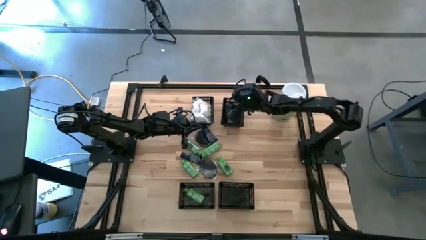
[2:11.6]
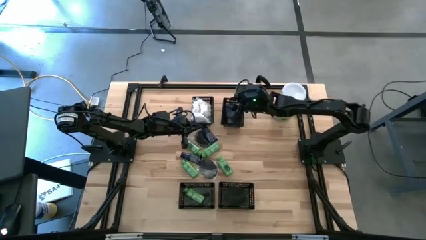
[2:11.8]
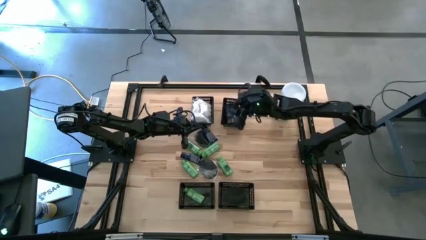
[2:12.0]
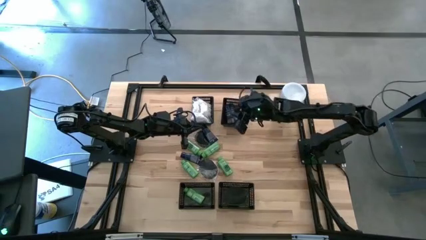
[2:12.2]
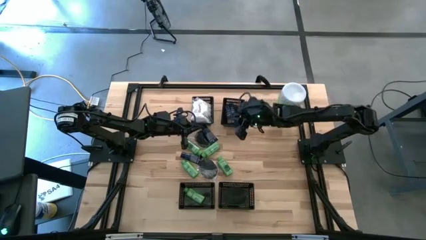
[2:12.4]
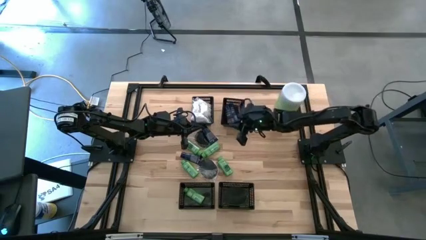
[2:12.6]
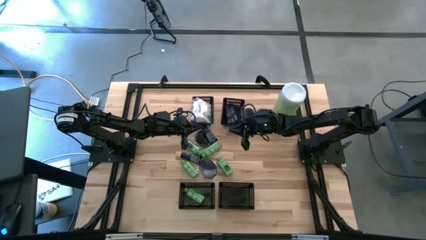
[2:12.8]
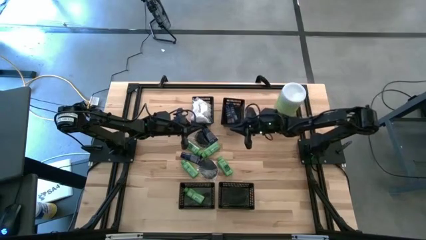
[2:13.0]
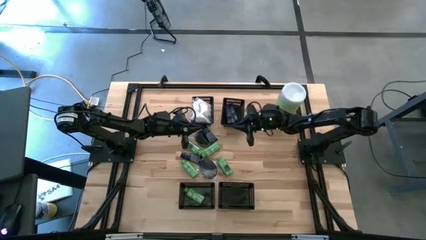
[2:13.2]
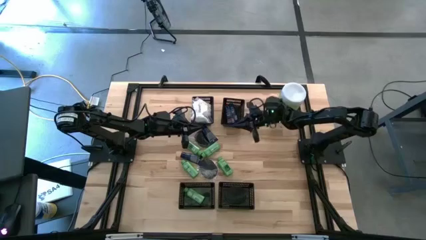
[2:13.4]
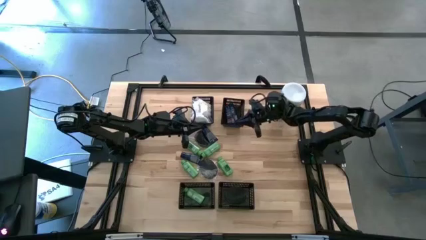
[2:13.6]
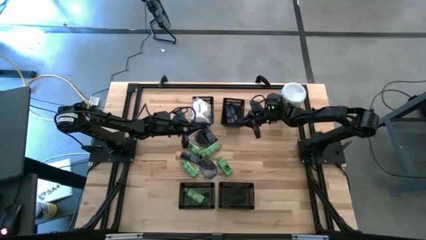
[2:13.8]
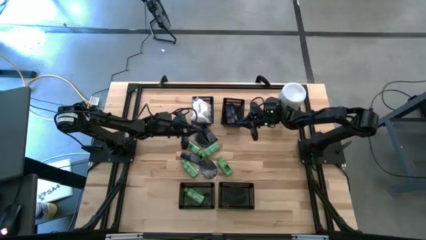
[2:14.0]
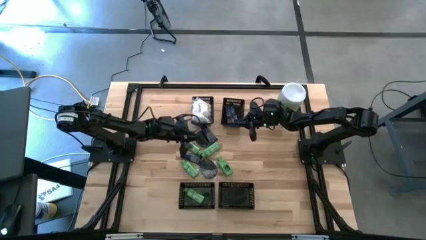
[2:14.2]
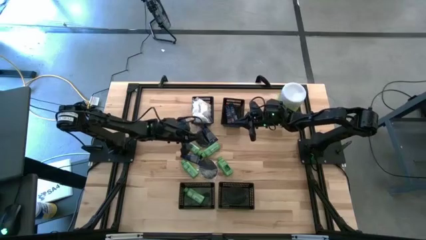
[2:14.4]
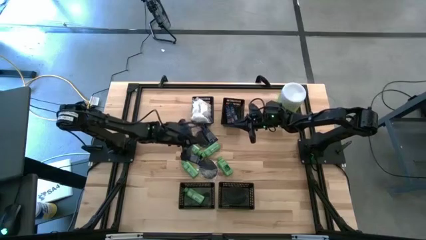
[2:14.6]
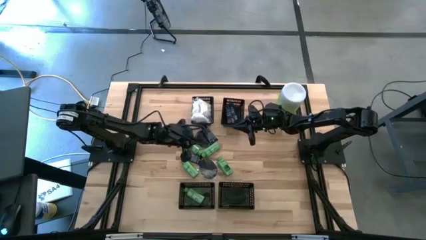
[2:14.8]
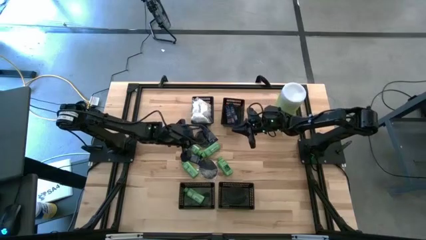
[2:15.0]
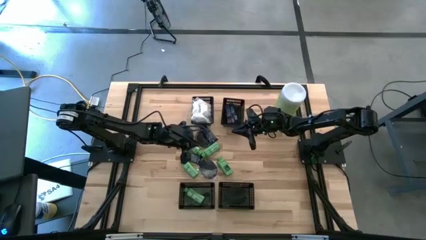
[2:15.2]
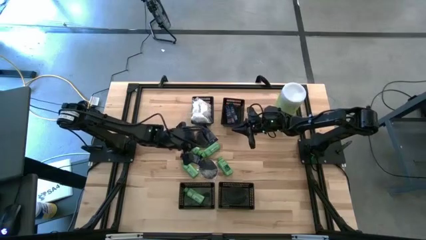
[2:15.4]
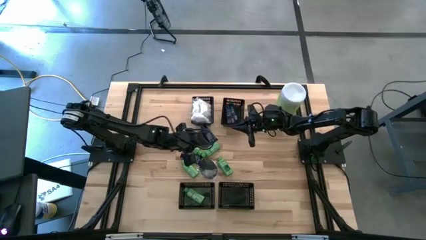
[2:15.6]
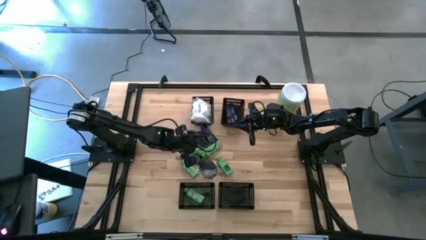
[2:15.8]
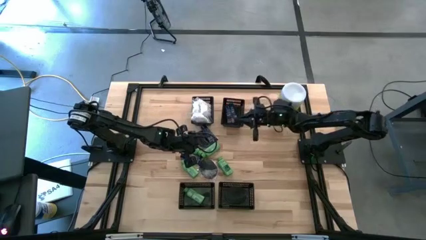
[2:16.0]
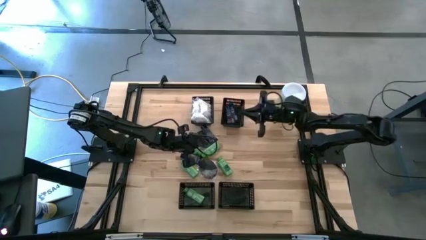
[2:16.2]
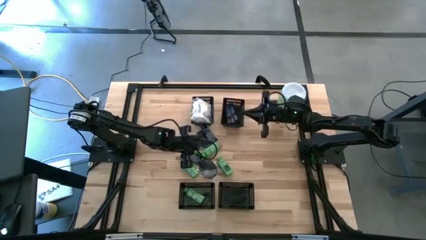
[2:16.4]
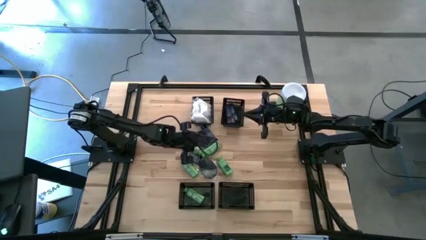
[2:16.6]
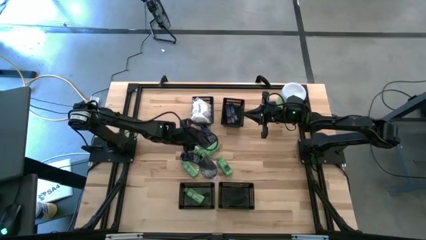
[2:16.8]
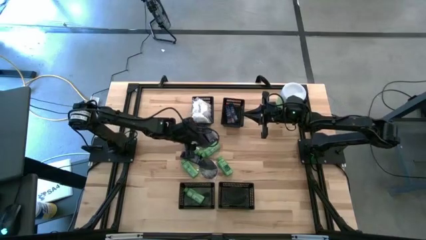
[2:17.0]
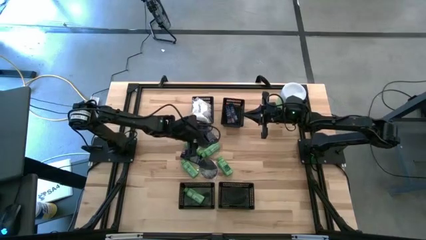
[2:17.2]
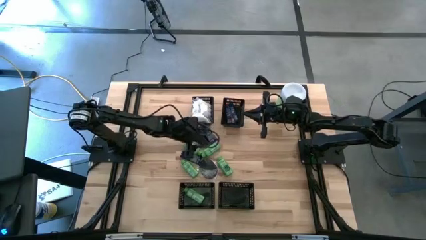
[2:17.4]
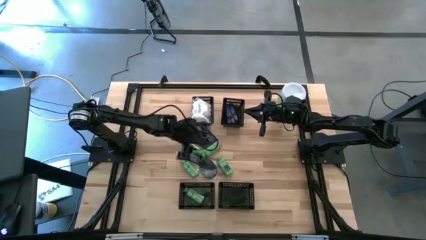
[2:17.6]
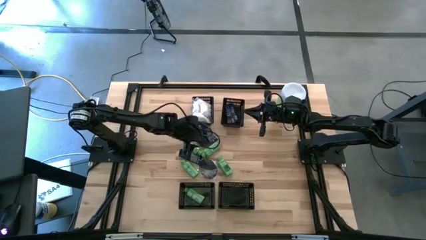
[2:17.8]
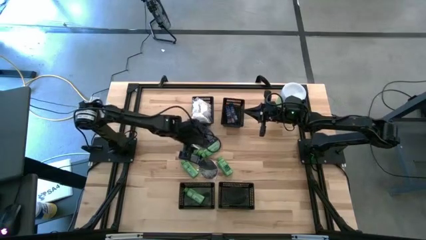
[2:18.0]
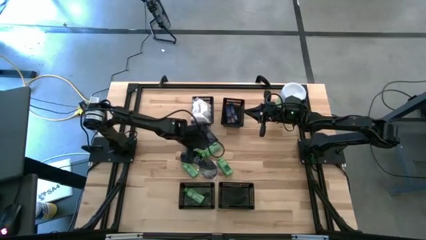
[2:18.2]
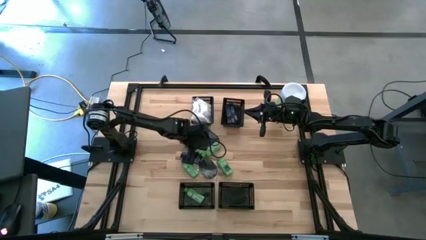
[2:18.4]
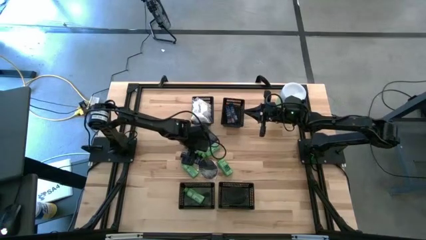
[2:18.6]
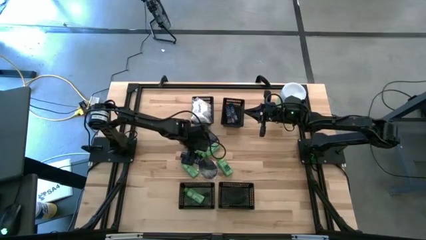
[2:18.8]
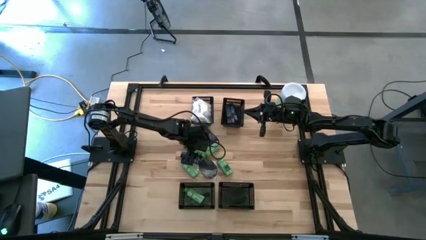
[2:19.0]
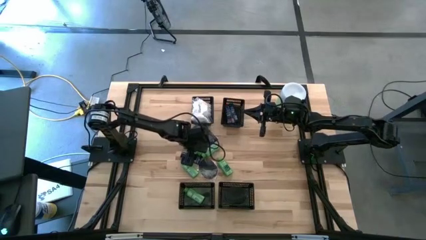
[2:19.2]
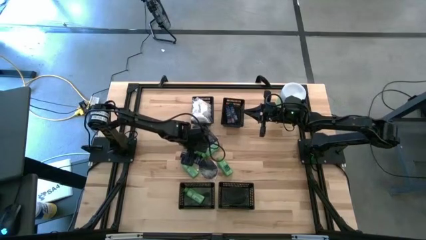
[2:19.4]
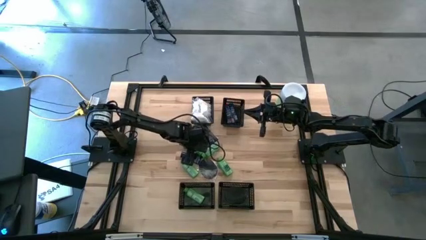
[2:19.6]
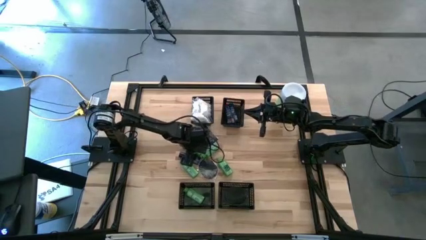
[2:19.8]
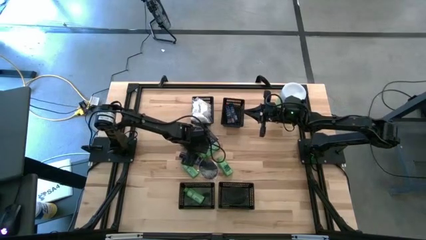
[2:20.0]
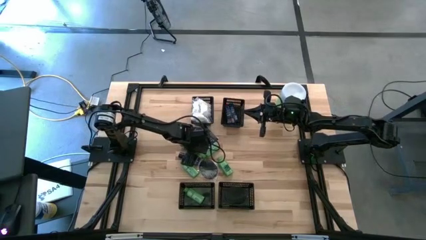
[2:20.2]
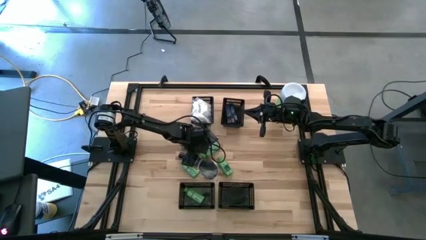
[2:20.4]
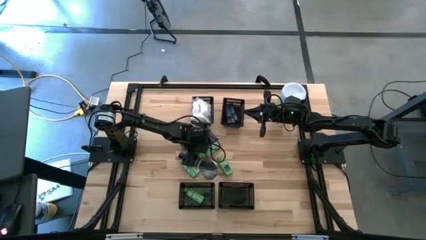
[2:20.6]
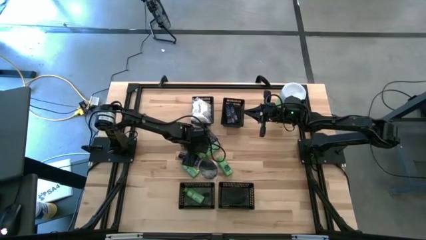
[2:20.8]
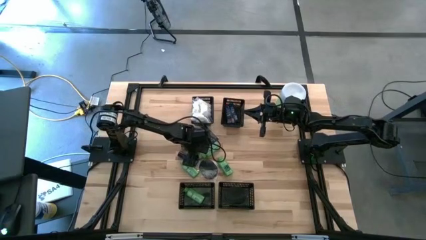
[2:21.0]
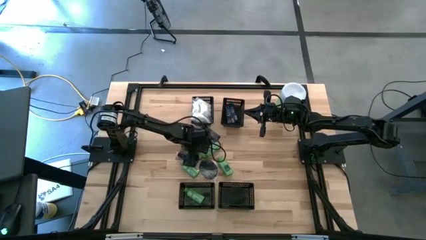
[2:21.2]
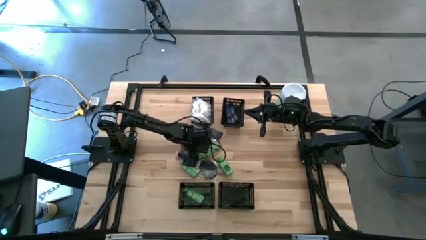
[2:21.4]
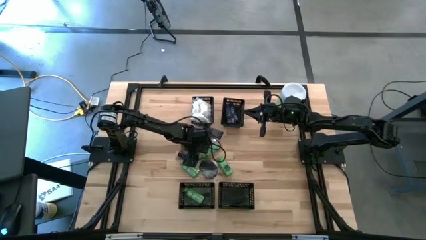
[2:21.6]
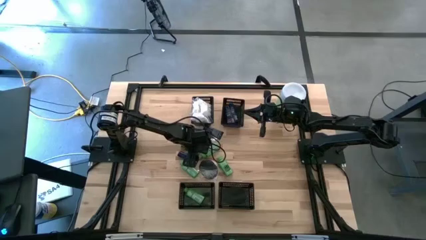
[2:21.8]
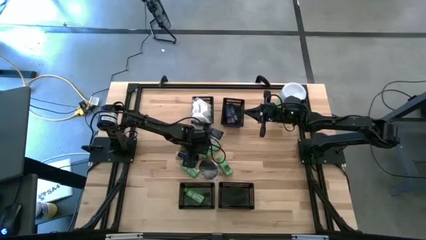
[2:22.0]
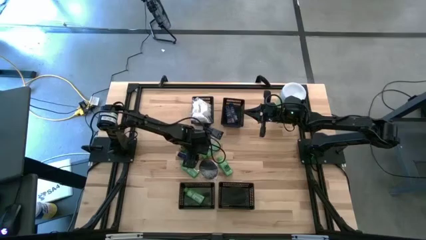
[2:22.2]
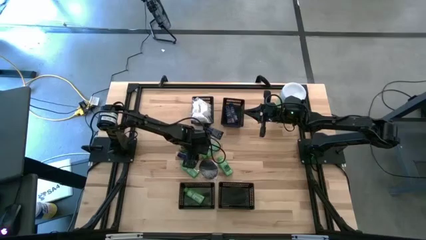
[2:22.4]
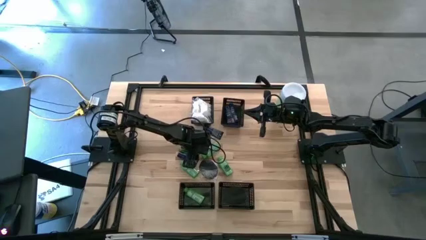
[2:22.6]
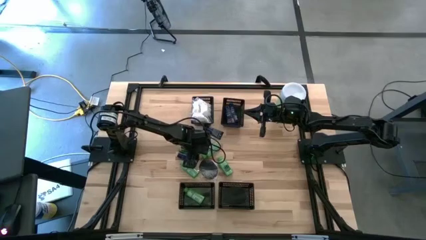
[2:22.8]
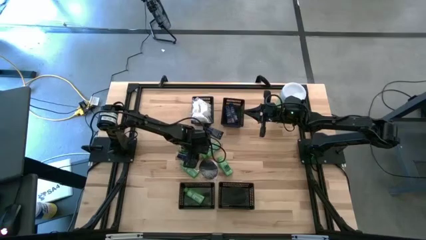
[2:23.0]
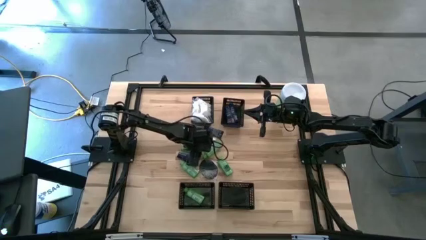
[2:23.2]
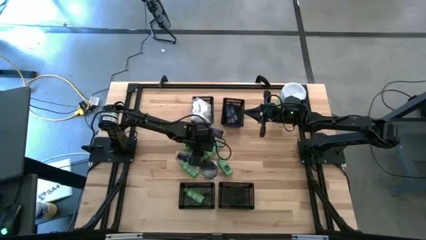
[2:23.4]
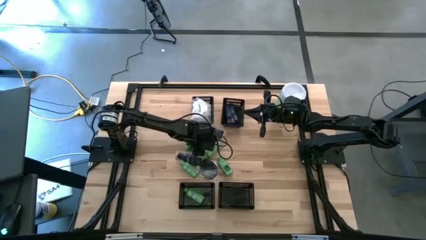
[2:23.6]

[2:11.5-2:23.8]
Task: Pick & Place Travel size toiletries
Put the green shampoo into the bottom left black bin

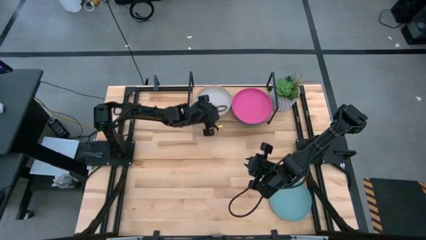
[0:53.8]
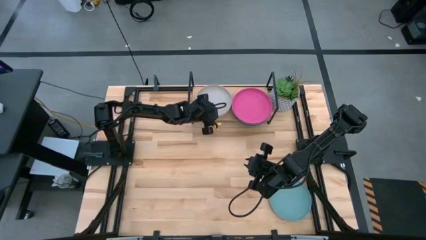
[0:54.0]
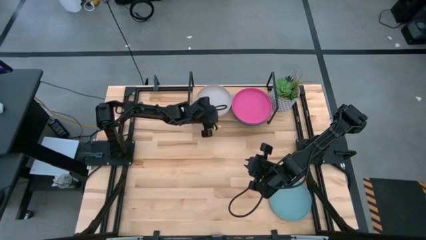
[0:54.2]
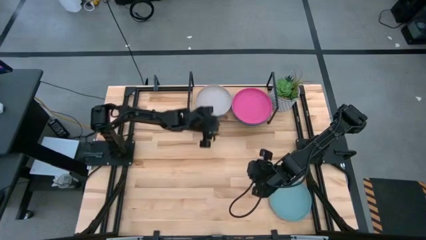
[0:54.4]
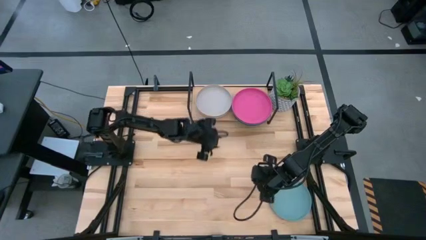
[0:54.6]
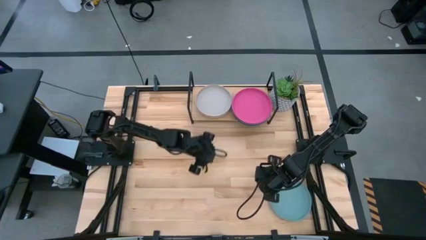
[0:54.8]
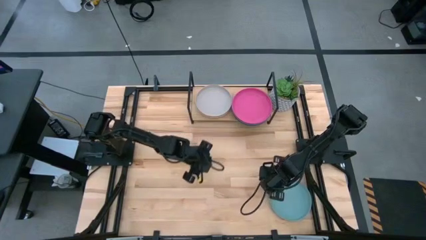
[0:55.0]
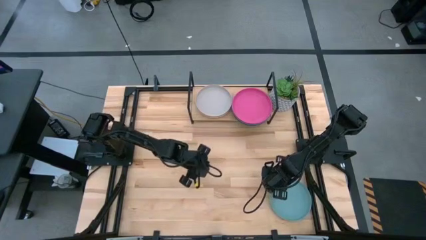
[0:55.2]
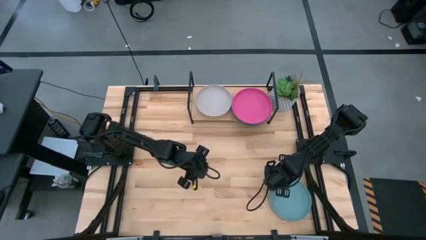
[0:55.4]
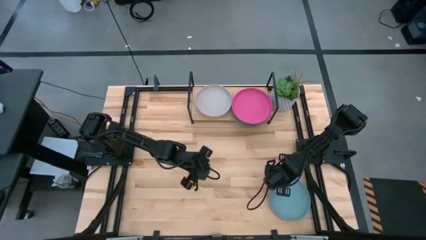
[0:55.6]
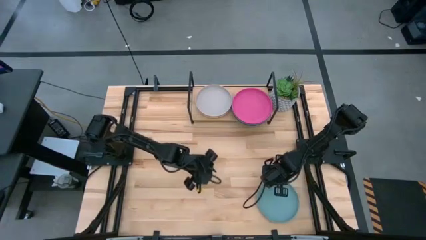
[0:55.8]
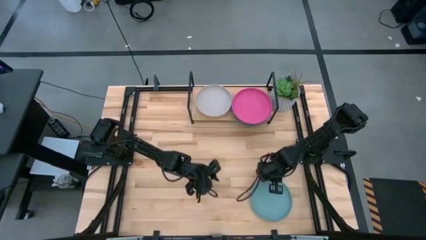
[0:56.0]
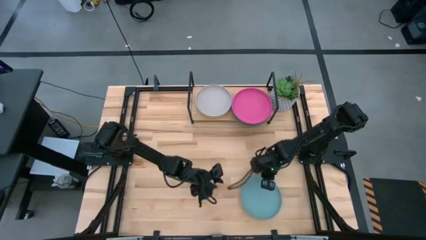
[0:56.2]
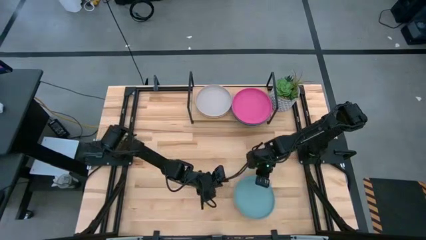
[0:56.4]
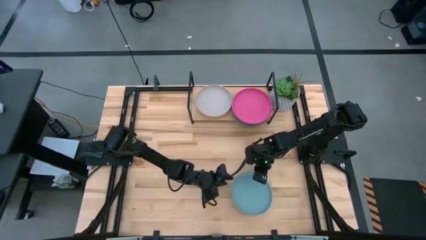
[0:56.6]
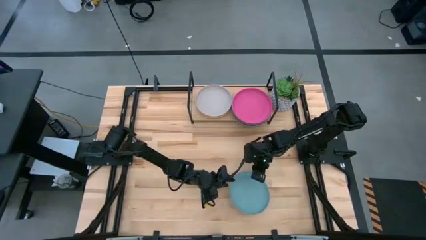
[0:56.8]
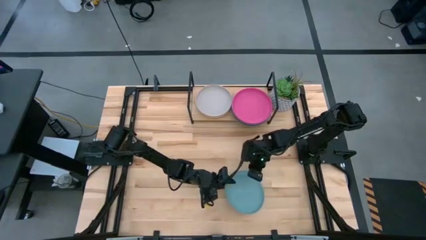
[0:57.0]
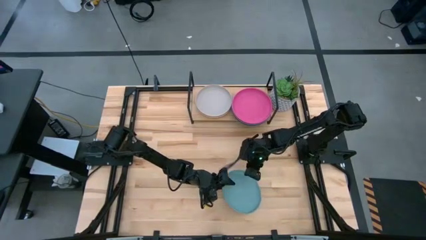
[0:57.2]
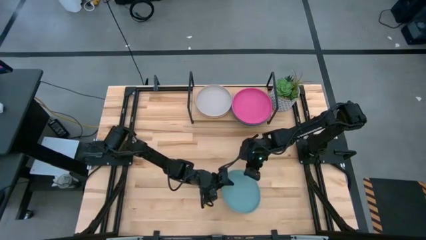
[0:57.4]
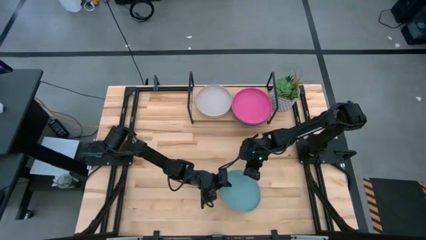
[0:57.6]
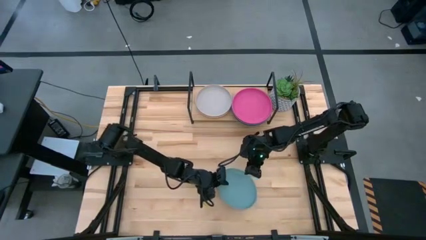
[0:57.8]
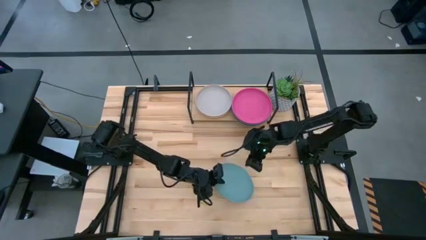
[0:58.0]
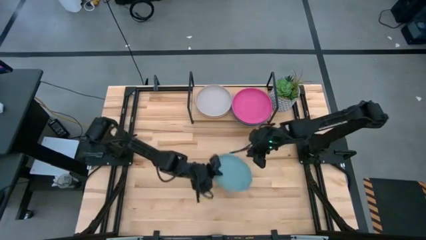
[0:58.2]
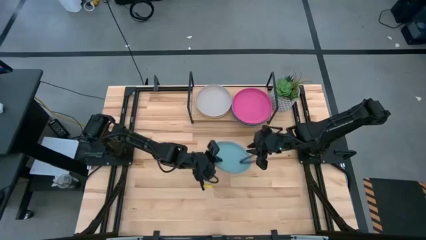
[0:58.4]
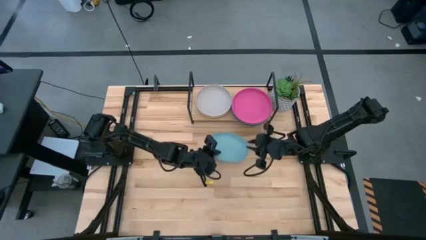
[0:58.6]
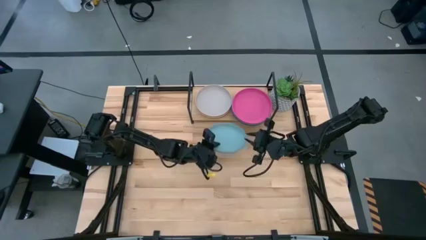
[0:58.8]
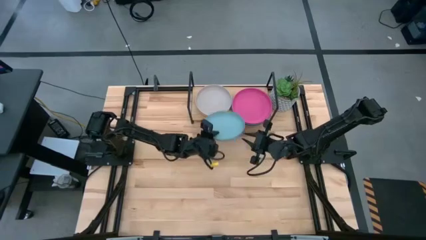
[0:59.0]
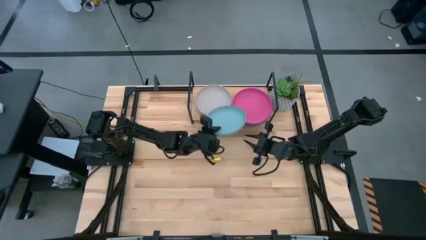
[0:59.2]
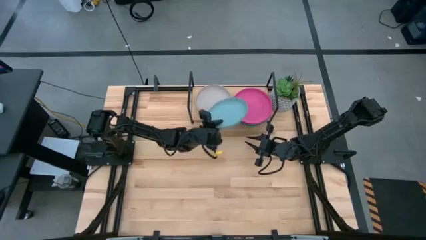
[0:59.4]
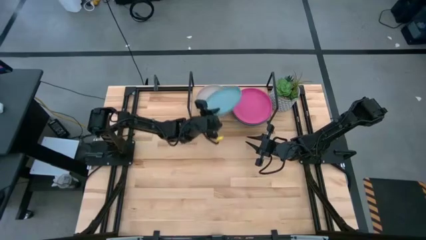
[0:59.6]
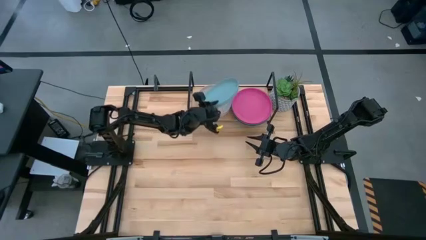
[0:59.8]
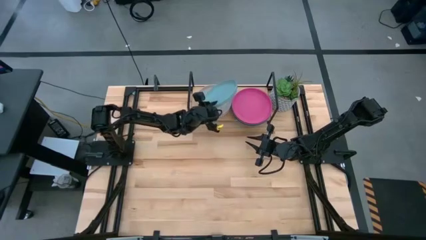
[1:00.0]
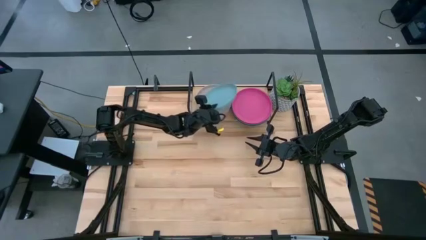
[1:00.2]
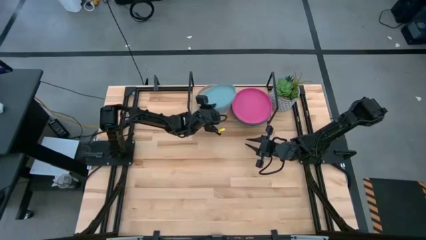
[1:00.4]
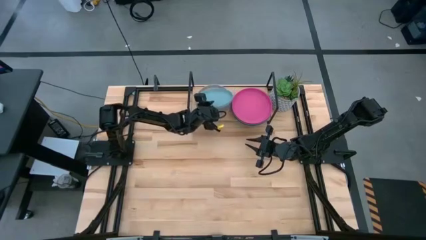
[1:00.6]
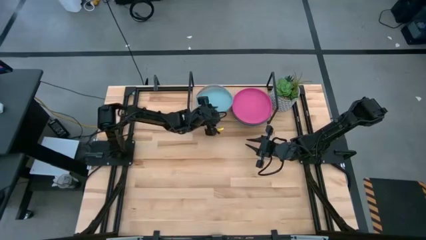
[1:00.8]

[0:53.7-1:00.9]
Task: Place and stack plates onto a shelf
Stack the light blue plate on top of the gray plate on the shelf
